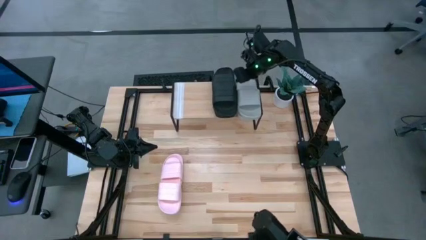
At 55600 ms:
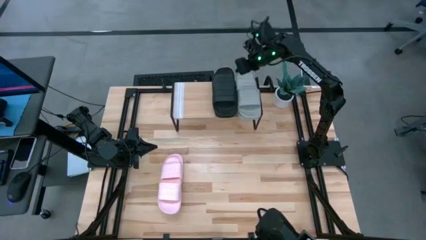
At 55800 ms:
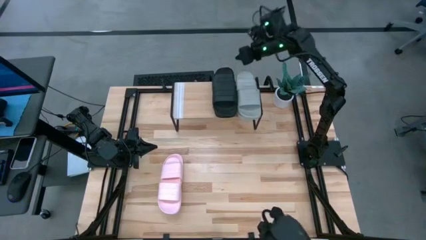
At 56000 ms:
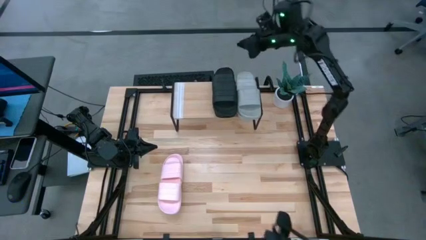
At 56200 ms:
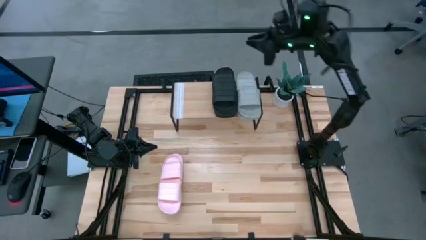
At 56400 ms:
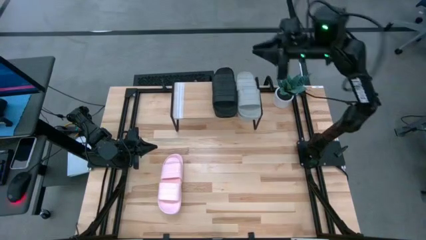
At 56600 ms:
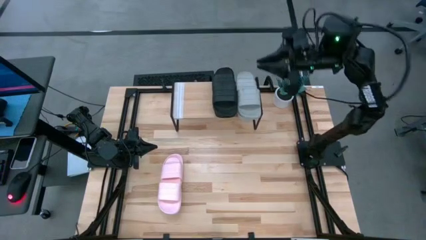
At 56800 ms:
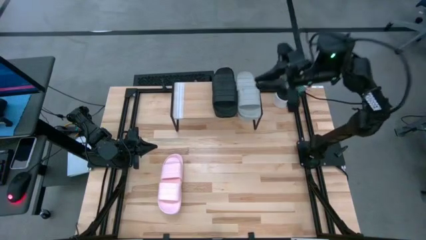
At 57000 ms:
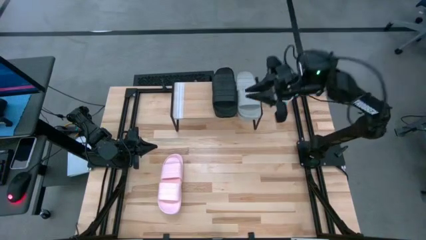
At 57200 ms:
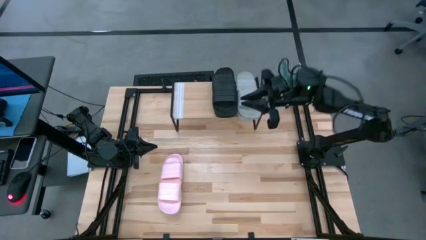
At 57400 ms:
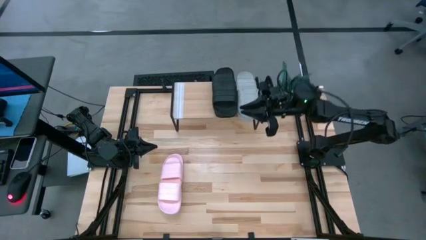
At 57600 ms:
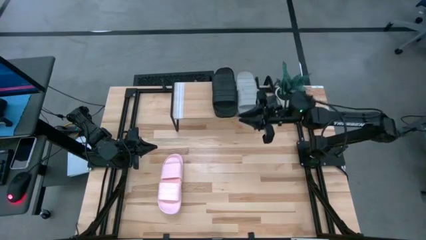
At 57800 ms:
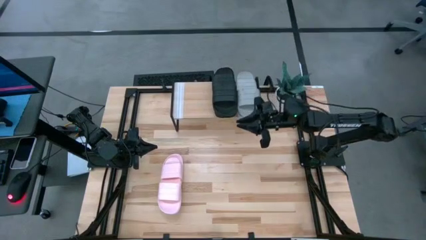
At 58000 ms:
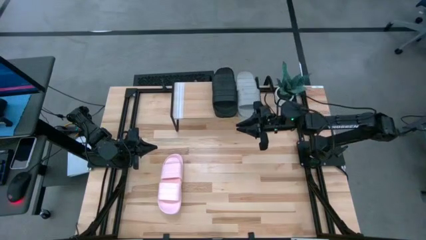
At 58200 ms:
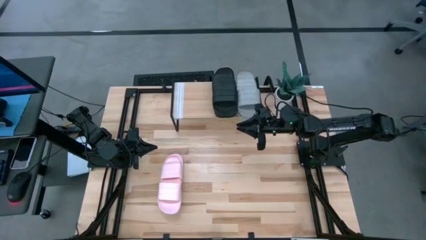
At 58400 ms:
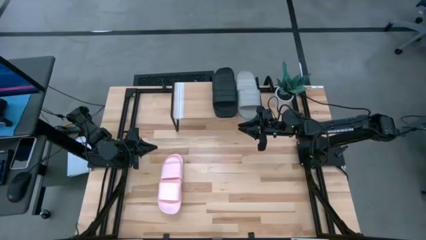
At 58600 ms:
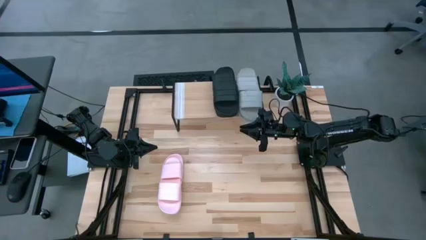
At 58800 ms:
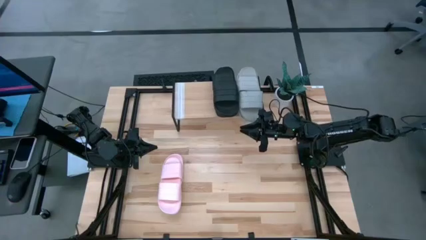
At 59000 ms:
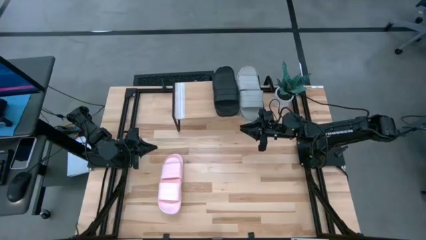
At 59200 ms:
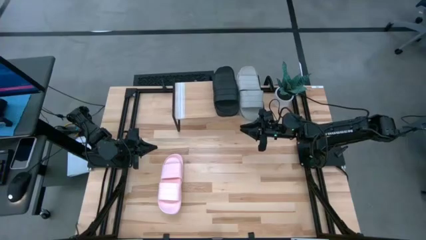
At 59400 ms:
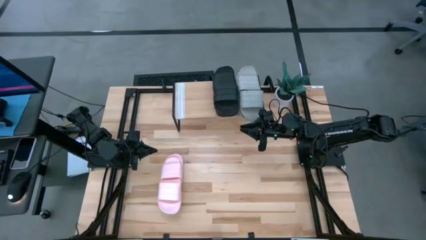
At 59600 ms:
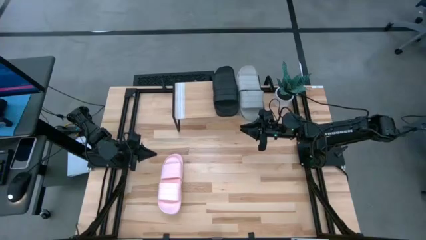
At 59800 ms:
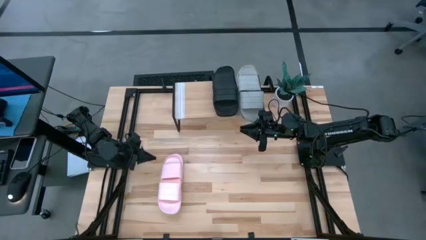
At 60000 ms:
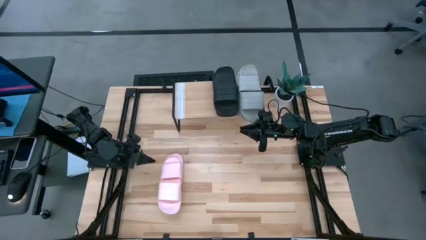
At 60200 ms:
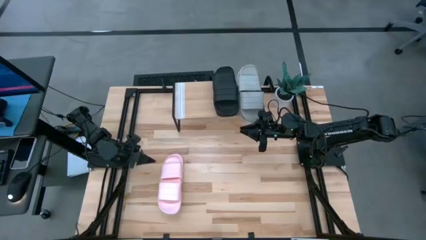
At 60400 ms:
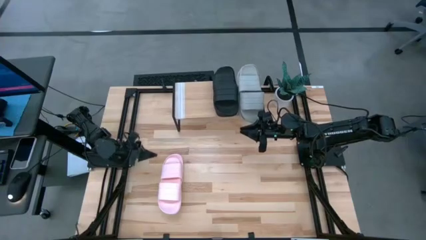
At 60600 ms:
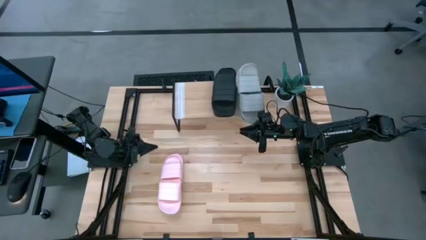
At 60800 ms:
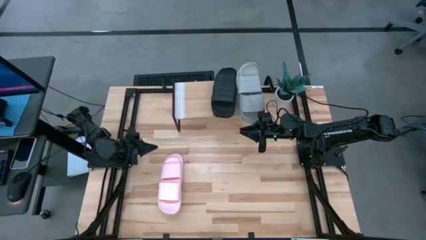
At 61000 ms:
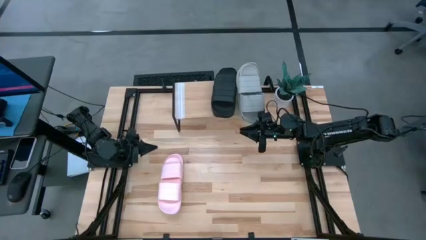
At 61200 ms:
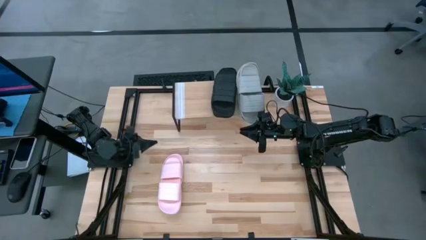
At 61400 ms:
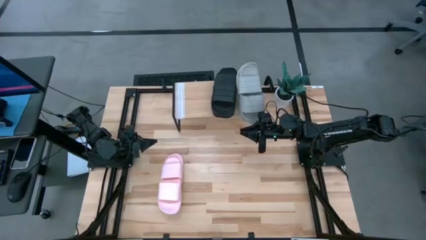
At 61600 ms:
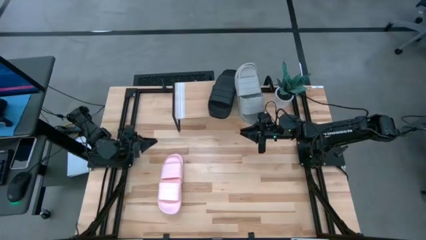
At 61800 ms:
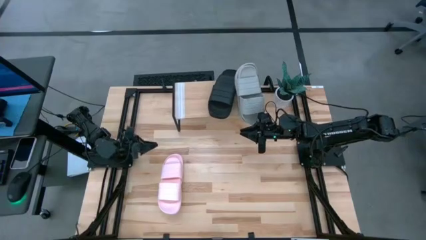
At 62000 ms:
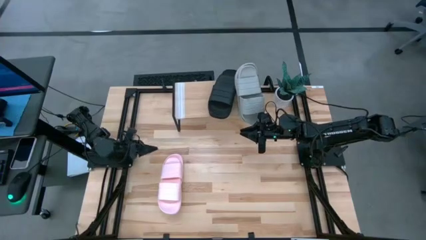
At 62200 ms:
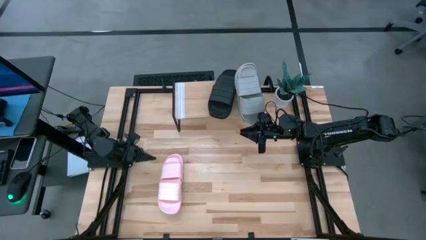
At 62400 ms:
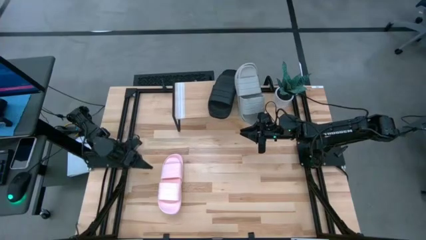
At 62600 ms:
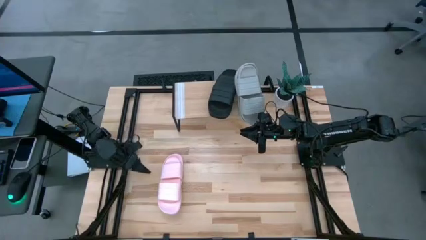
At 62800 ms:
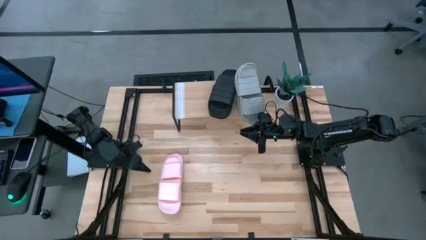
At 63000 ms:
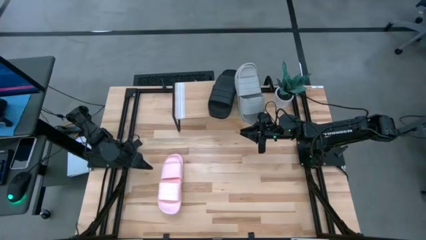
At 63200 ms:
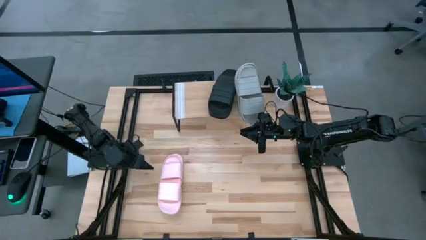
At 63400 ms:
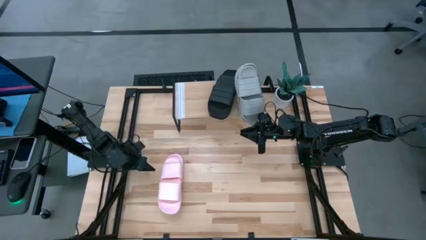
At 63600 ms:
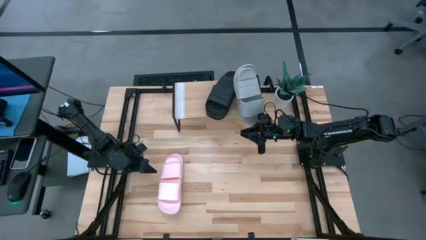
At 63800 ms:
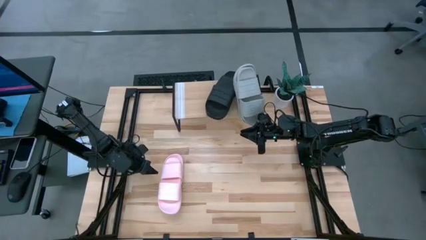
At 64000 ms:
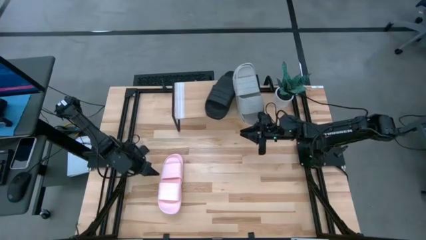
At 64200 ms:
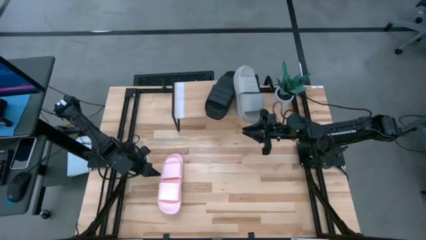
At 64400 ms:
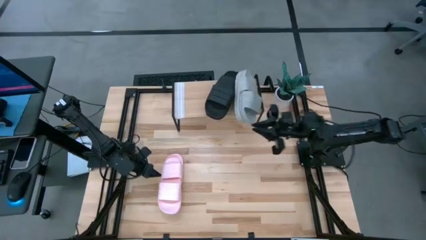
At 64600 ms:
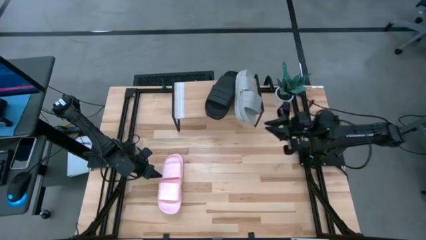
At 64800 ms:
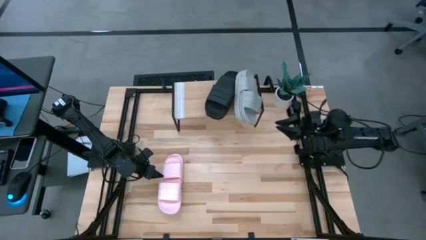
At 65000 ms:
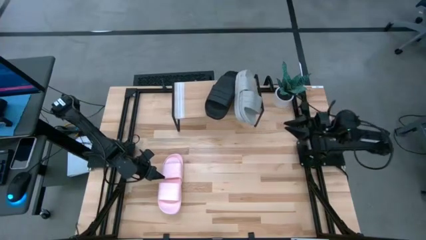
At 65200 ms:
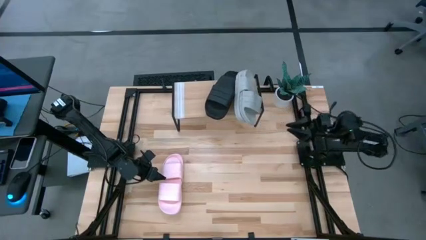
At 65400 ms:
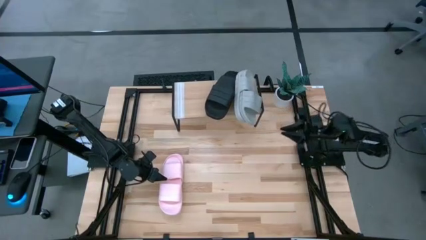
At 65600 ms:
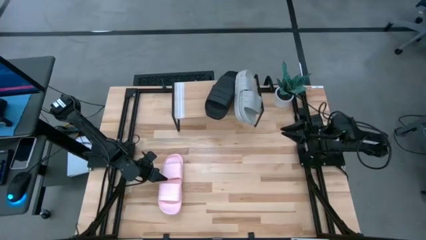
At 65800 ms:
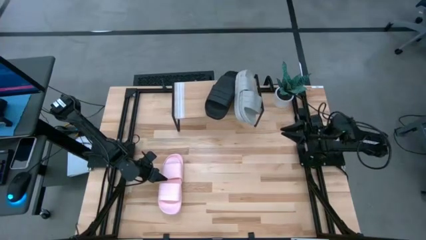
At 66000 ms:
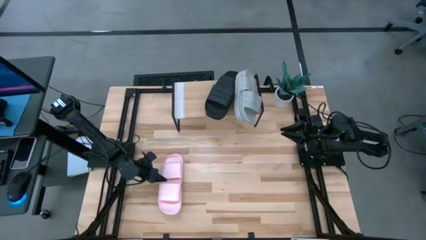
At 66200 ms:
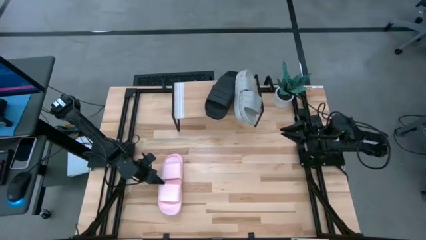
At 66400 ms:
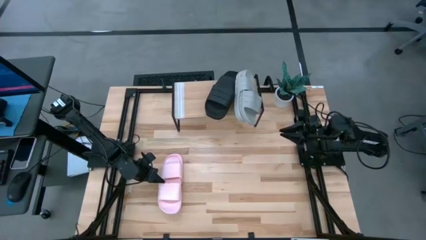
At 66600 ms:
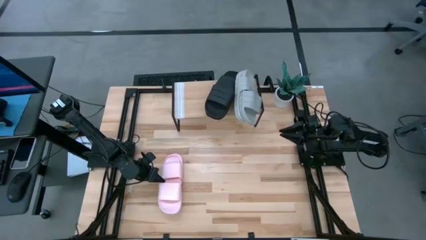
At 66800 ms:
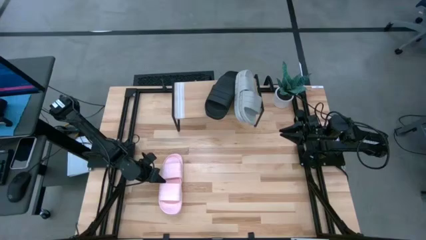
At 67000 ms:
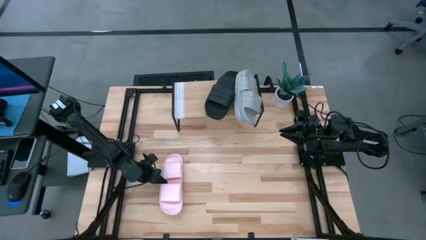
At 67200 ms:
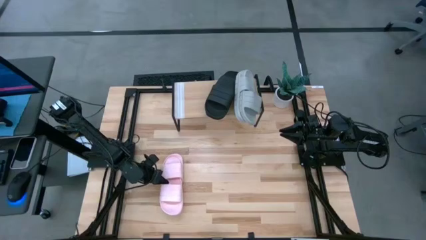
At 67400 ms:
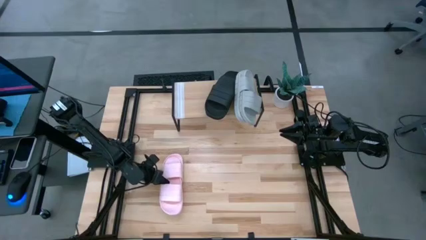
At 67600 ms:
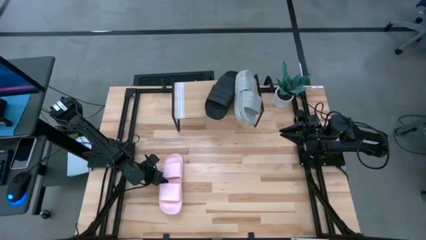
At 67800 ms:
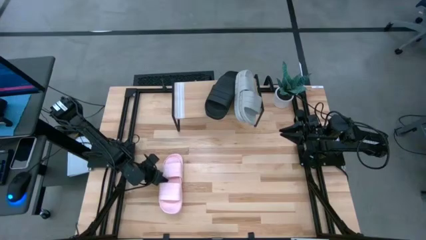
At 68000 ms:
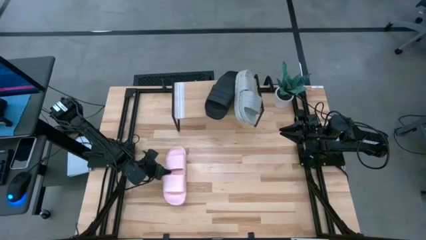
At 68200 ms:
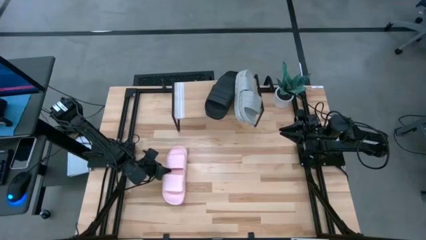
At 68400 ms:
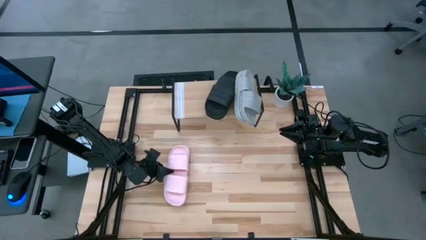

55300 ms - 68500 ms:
Task: Pick and place slides into the shelf
Put the pink pair of slides on the shelf
